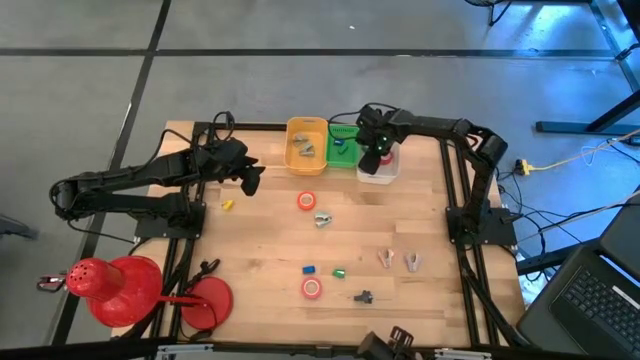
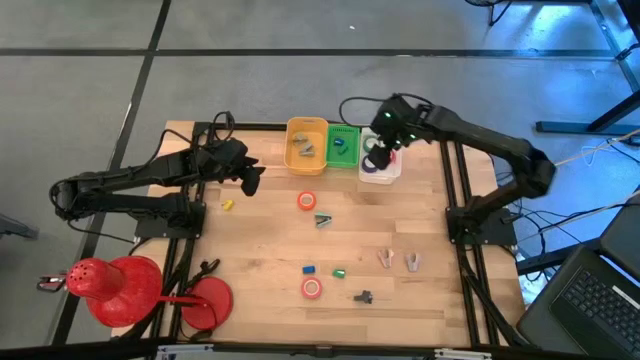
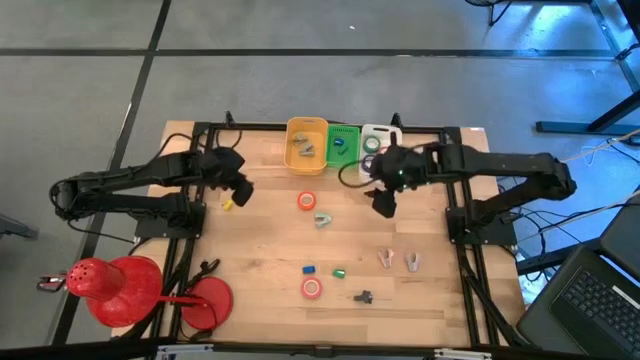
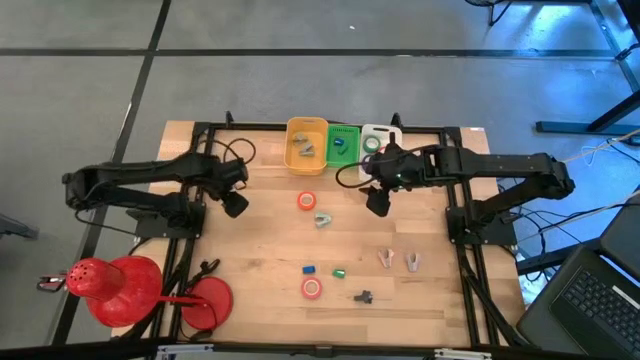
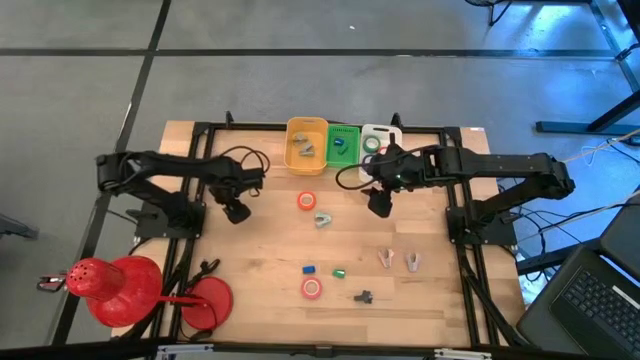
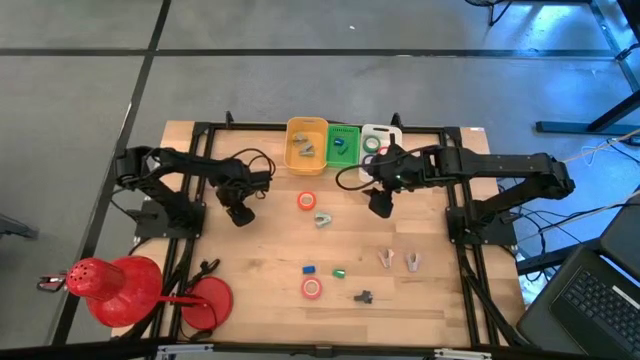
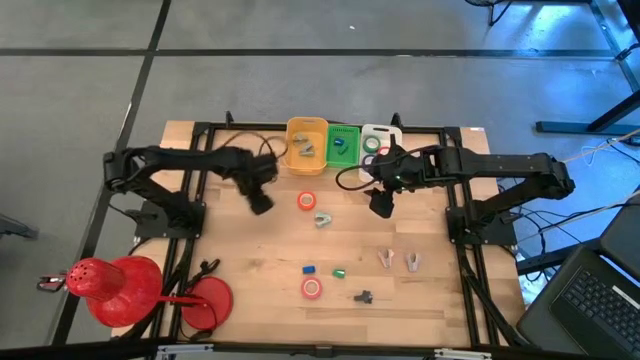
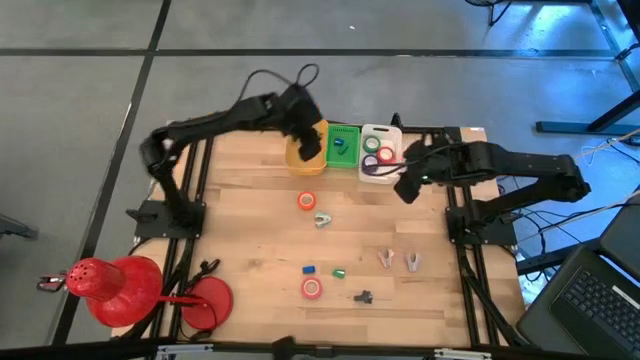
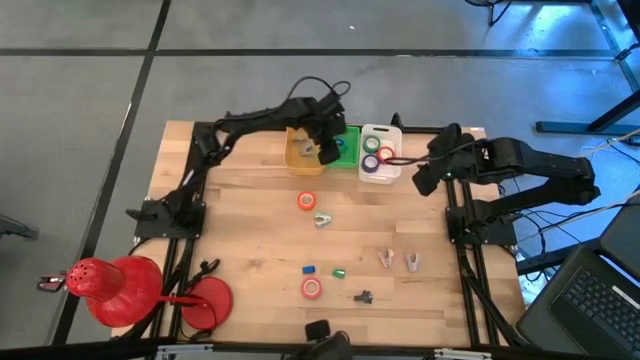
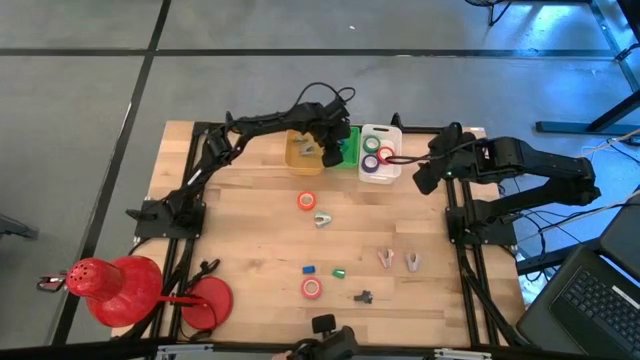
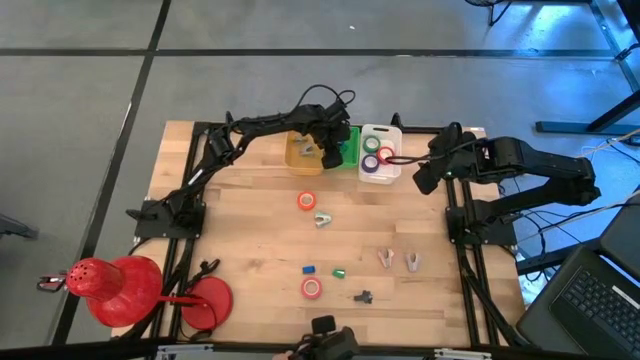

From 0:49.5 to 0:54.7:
Task: Pick and place Stapler, Stapler remover, tape
Put the yellow stapler into the green bin

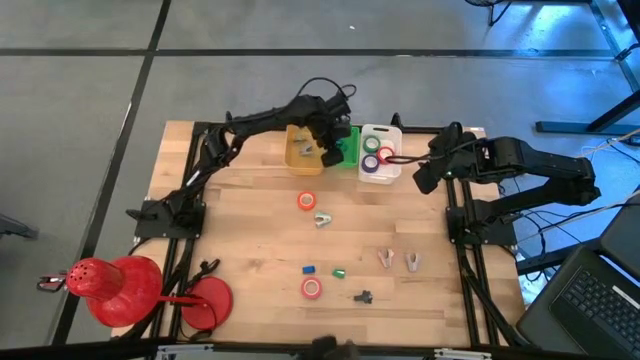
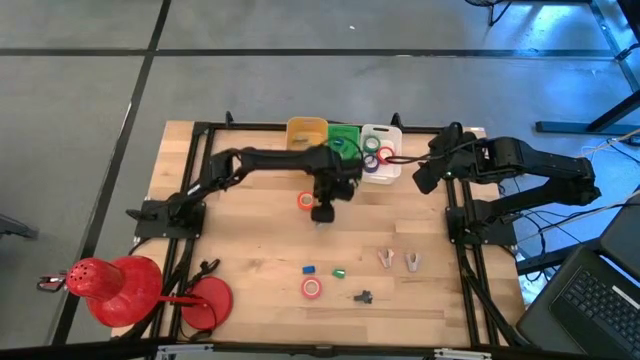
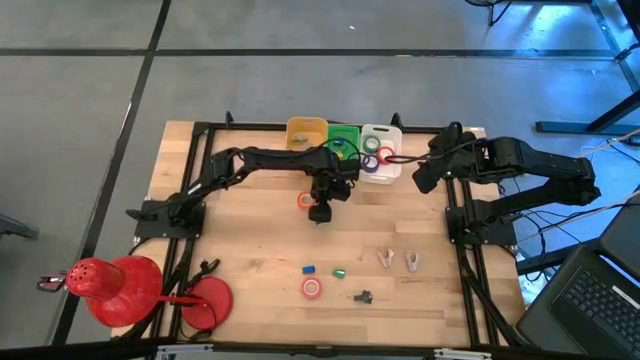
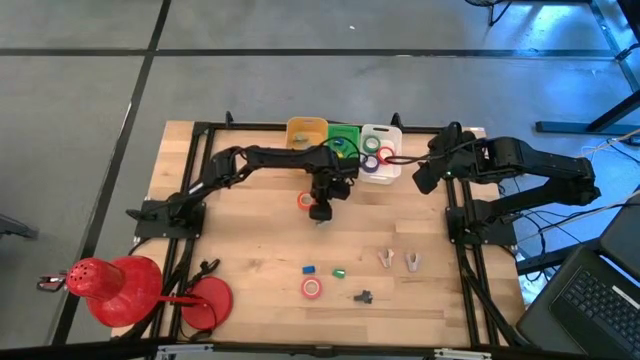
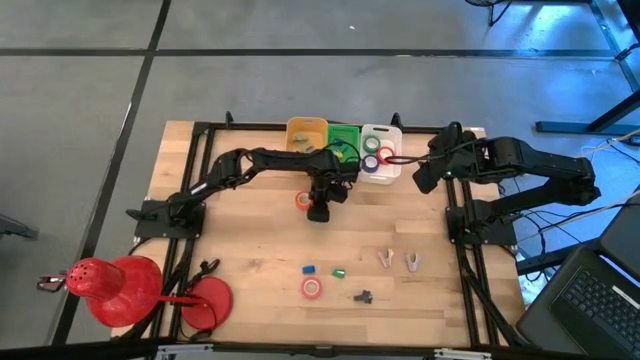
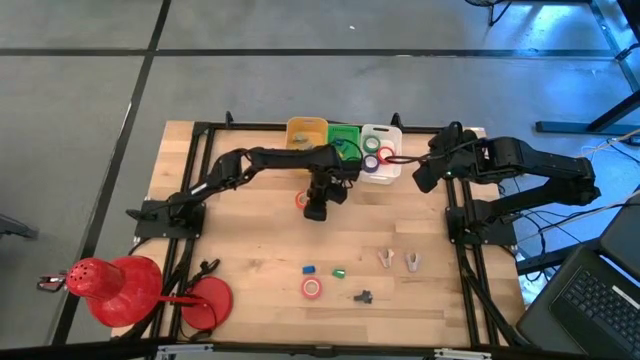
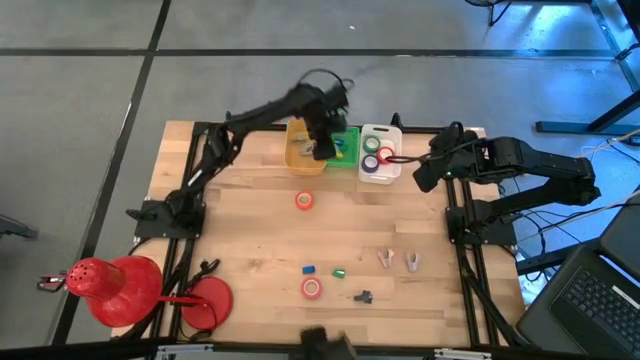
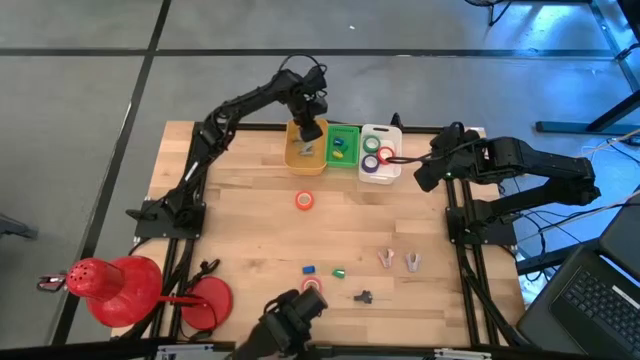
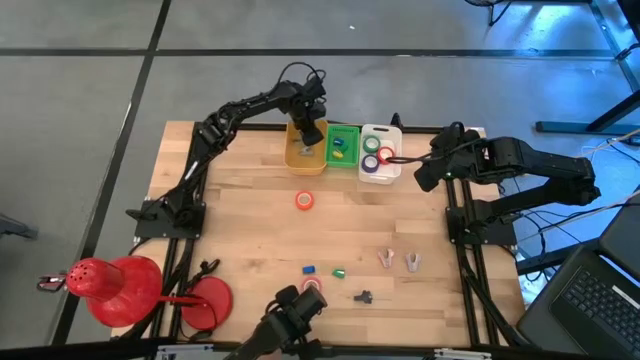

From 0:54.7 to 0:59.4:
Put the light blue staple remover into the yellow bin

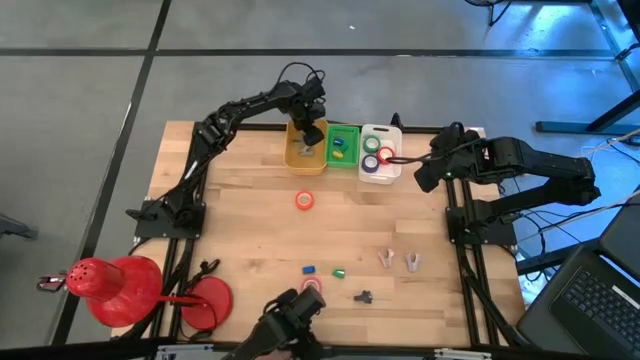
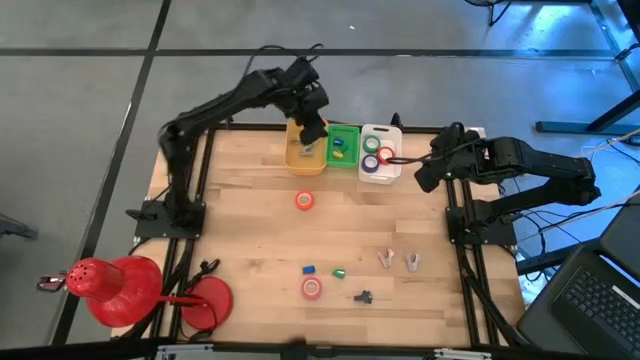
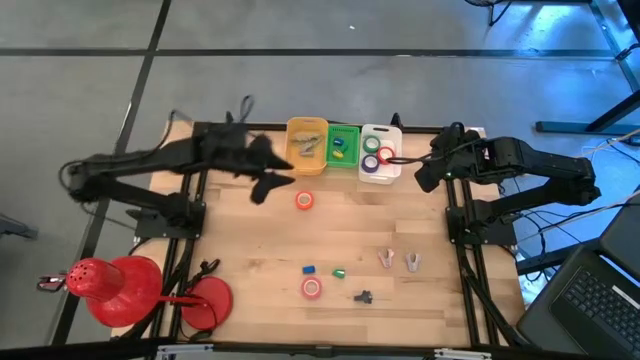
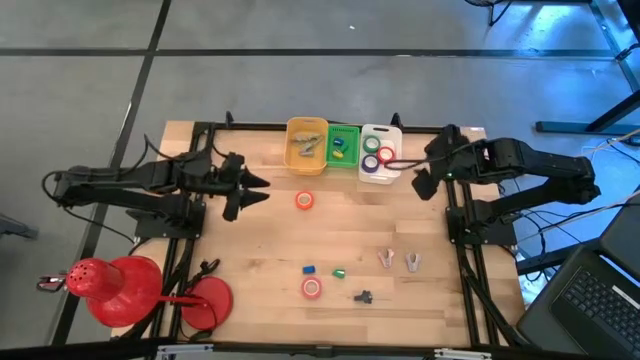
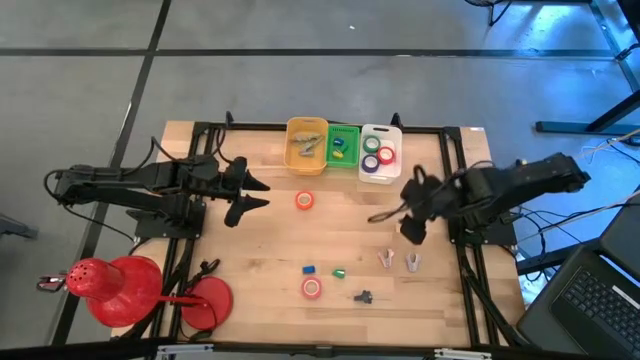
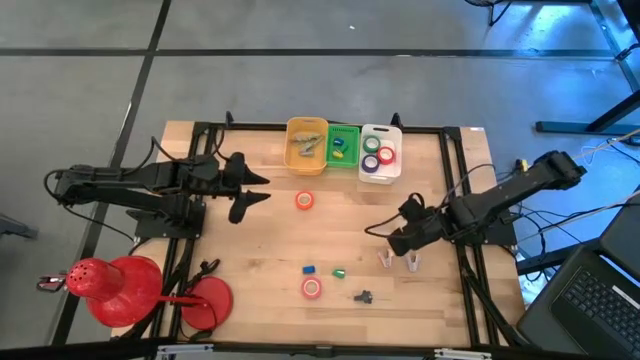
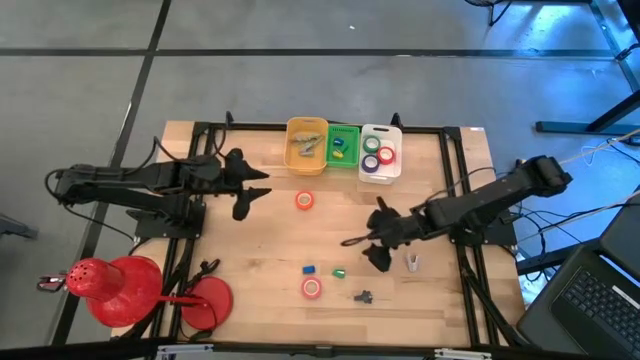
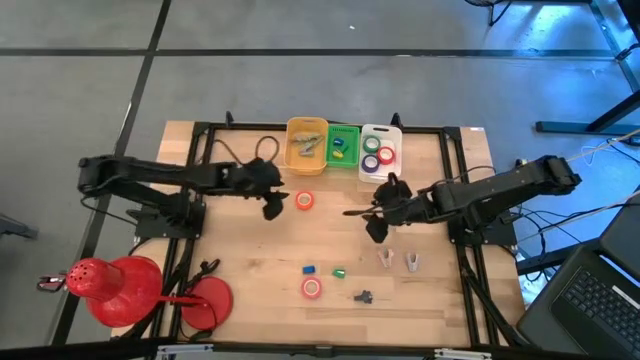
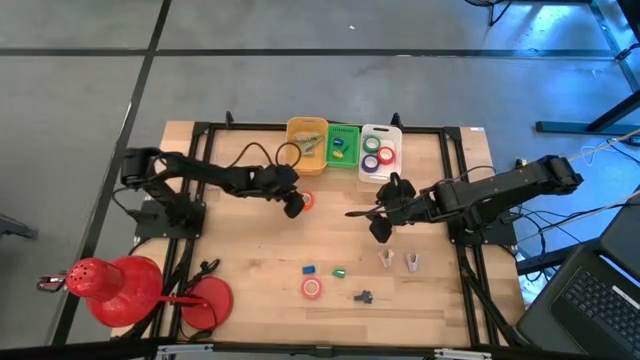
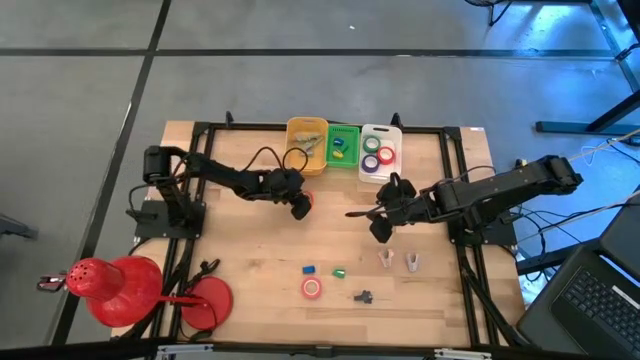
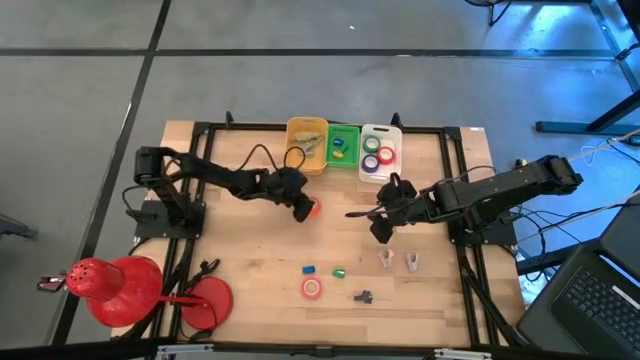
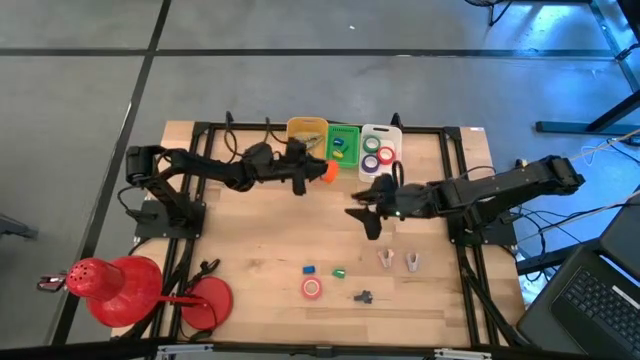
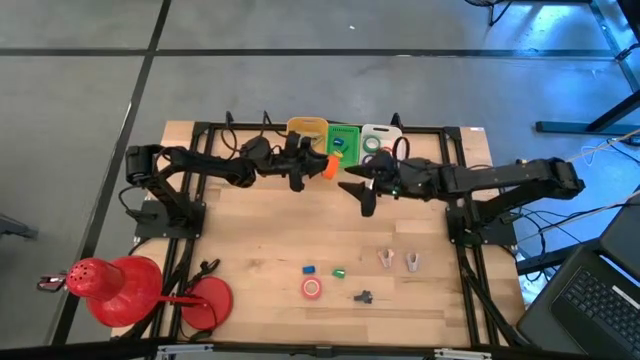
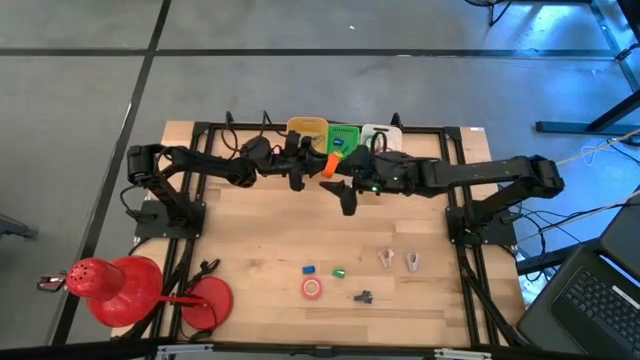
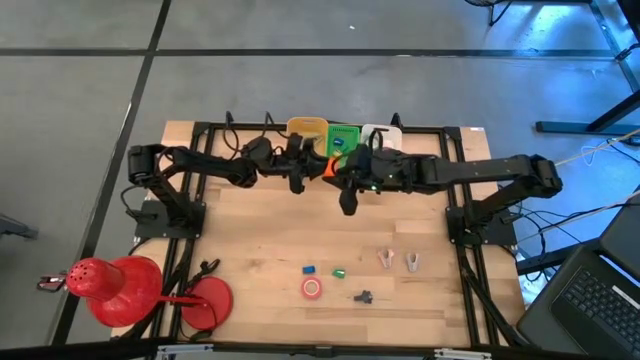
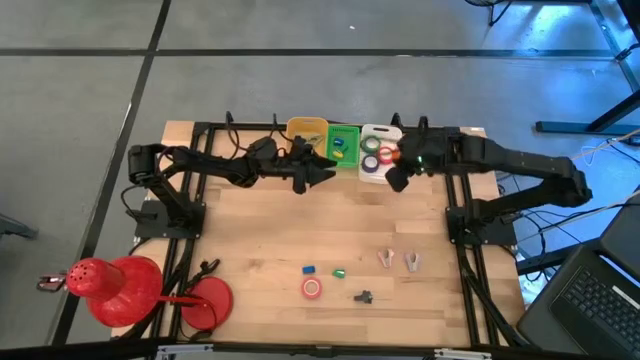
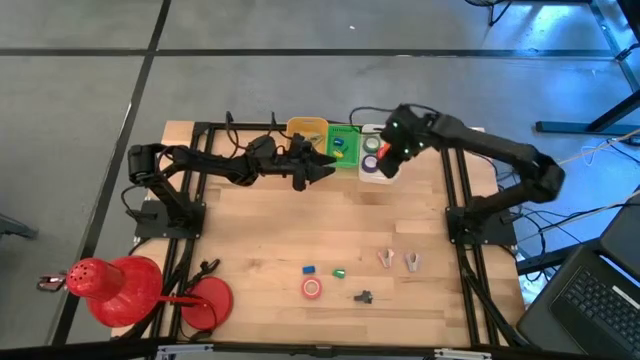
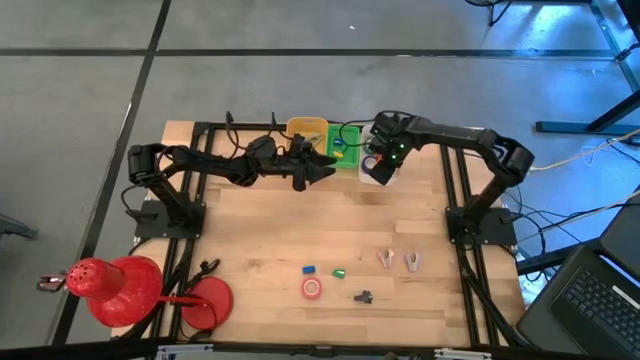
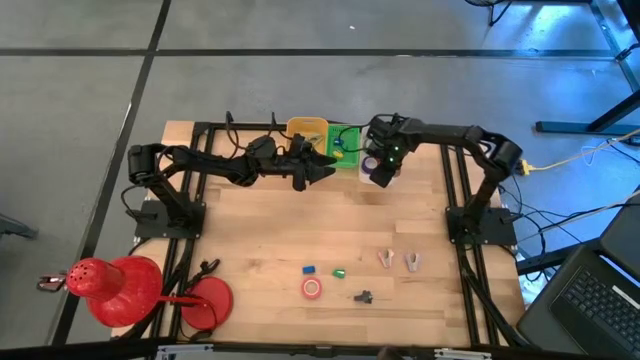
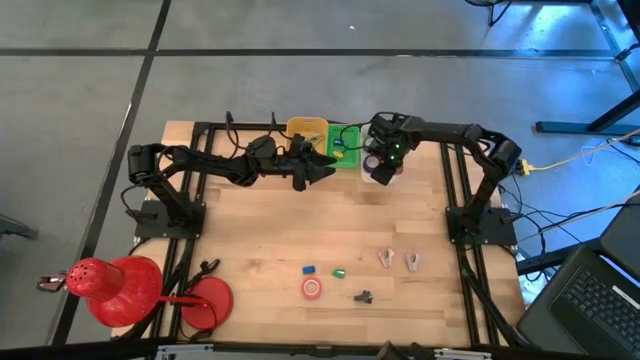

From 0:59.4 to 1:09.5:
Put the orange tape into the white bin

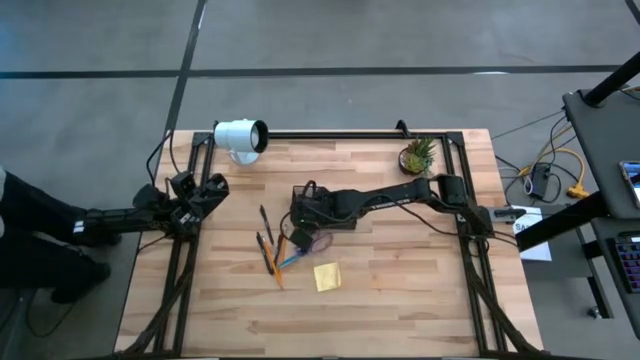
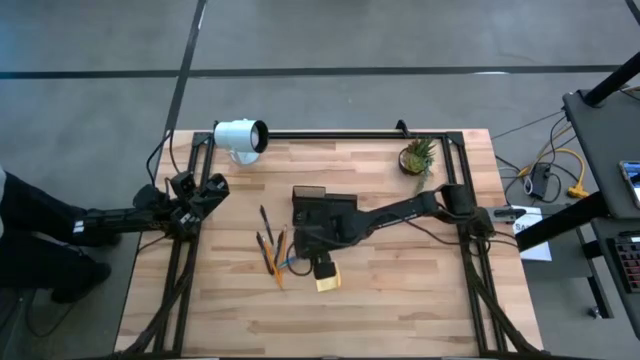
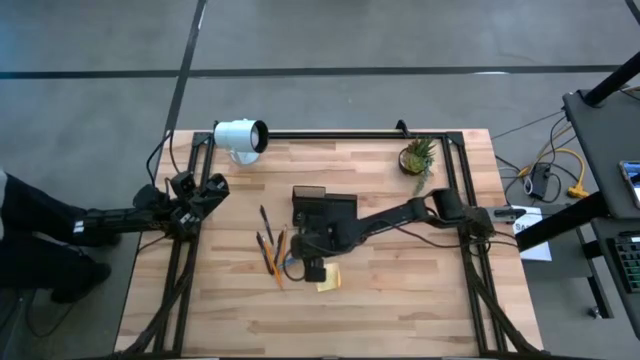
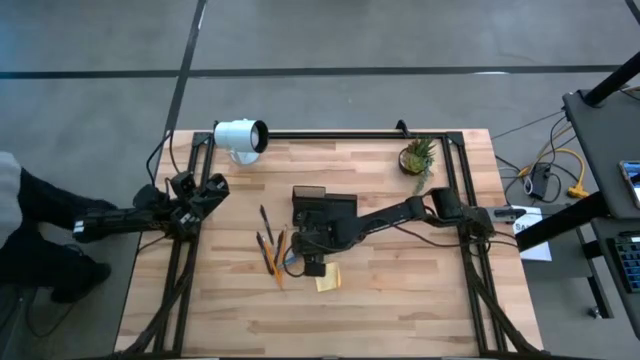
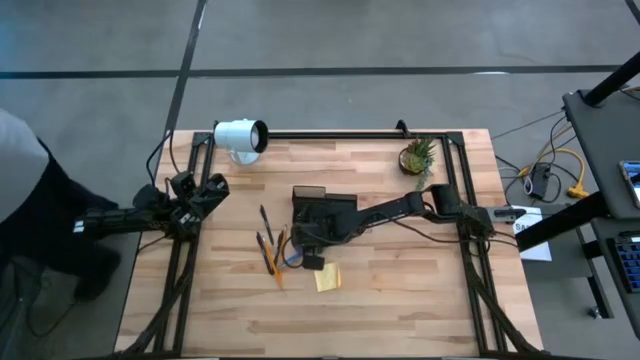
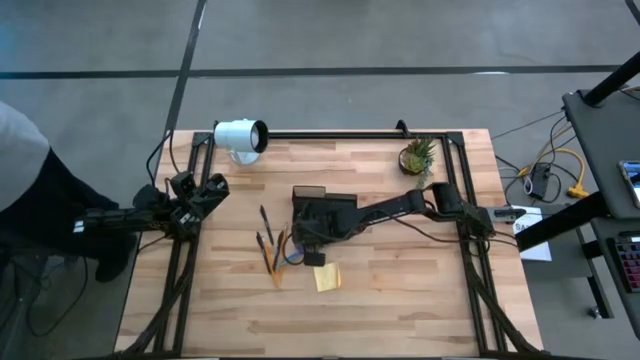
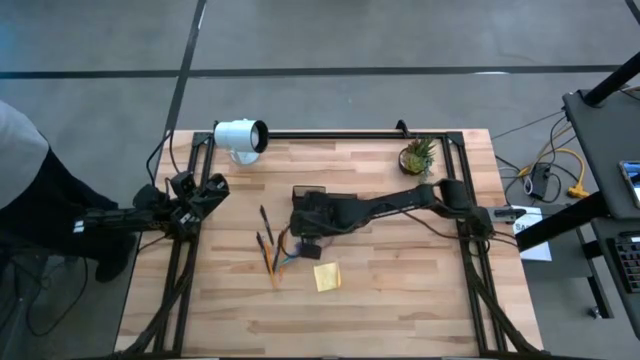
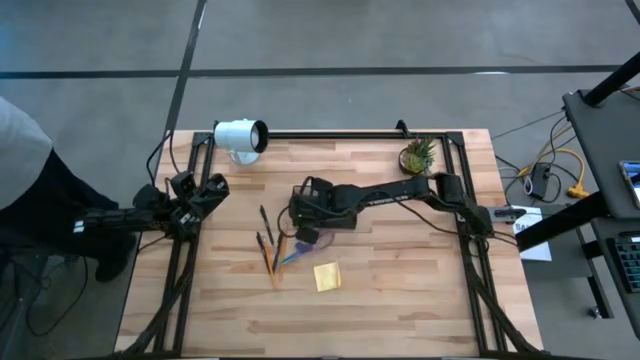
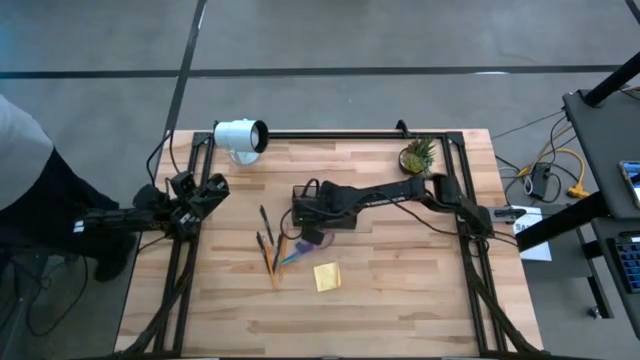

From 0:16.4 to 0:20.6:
Task: Pick and place office supplies into organizer
Put the black binder clip into the black desk organizer
